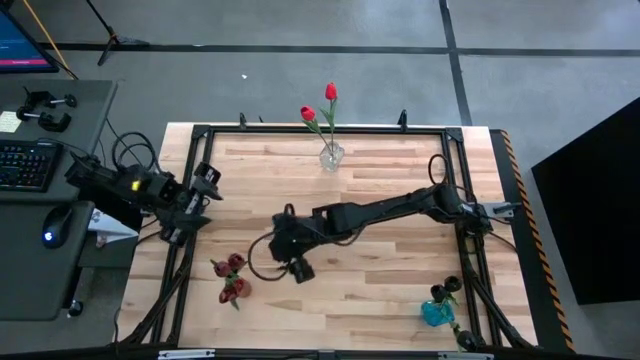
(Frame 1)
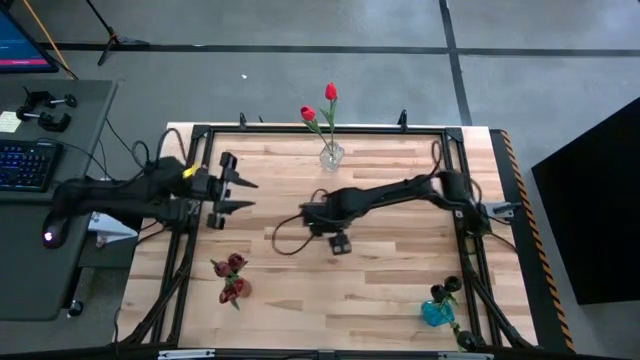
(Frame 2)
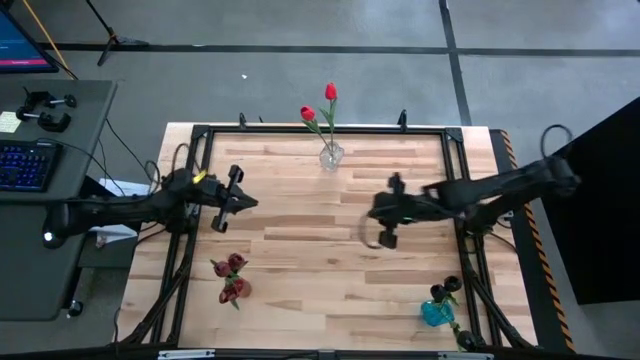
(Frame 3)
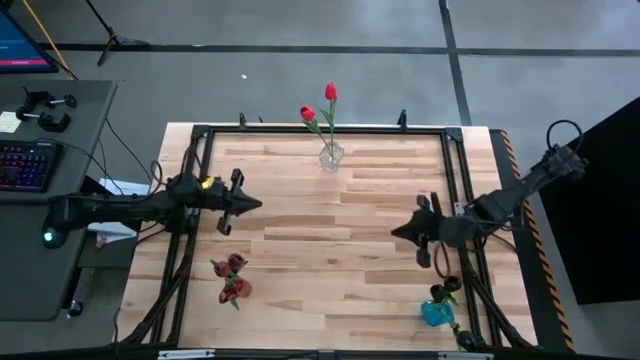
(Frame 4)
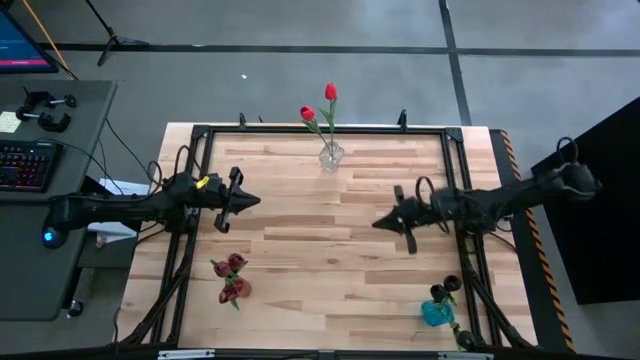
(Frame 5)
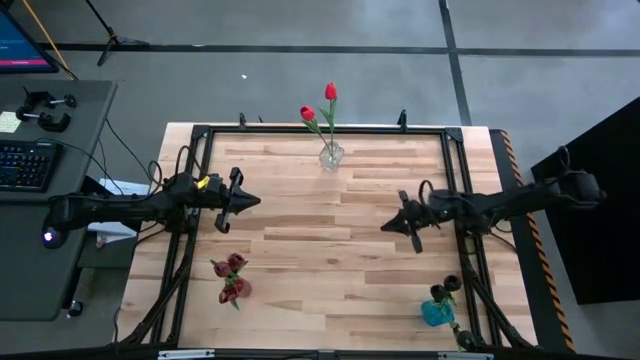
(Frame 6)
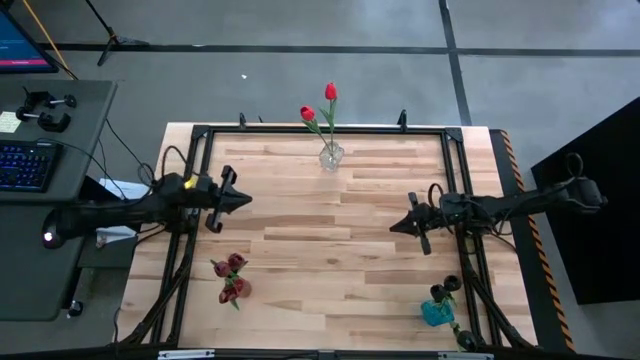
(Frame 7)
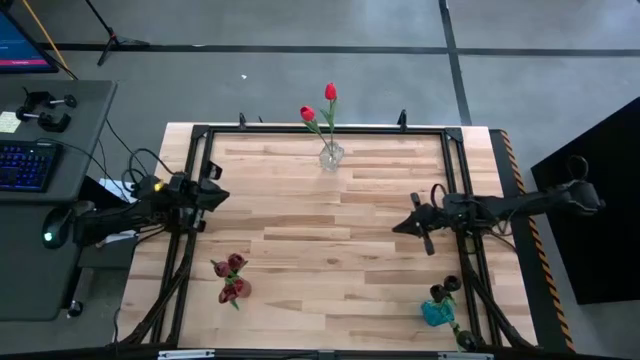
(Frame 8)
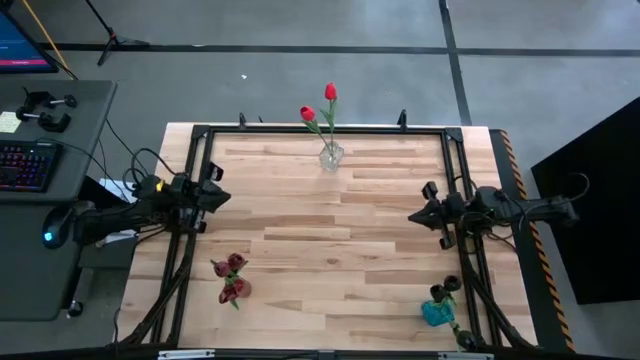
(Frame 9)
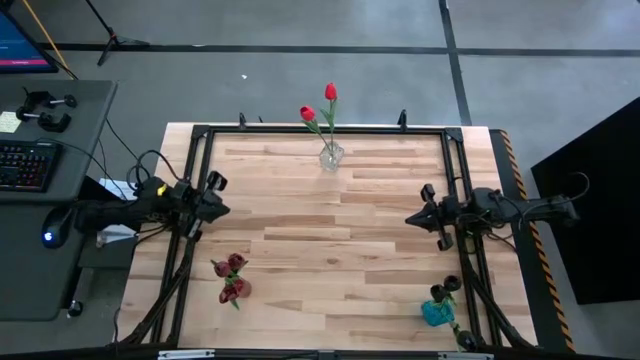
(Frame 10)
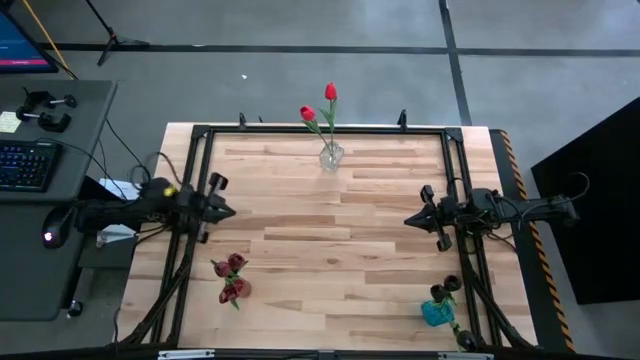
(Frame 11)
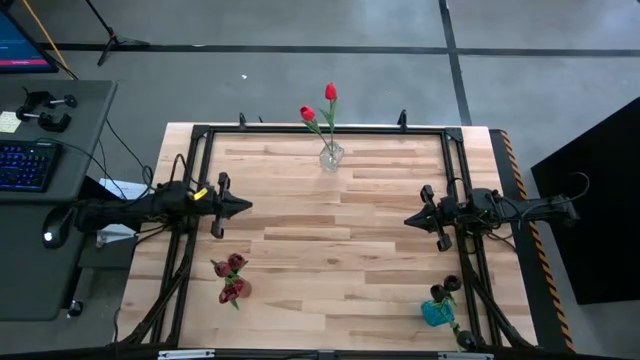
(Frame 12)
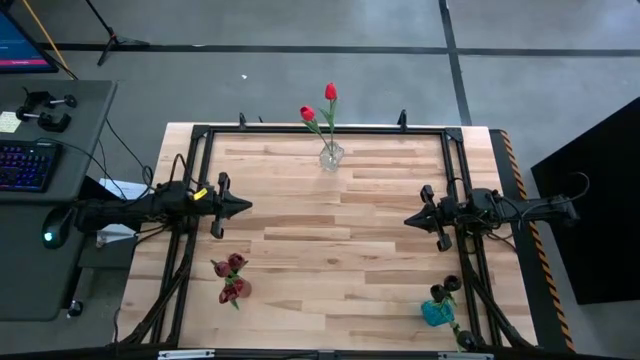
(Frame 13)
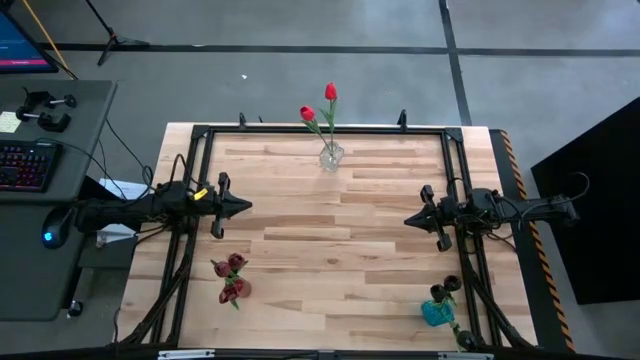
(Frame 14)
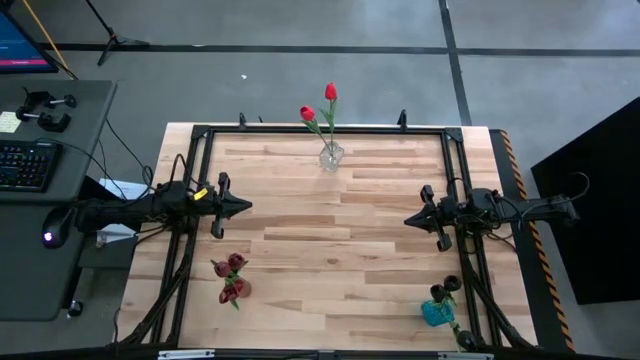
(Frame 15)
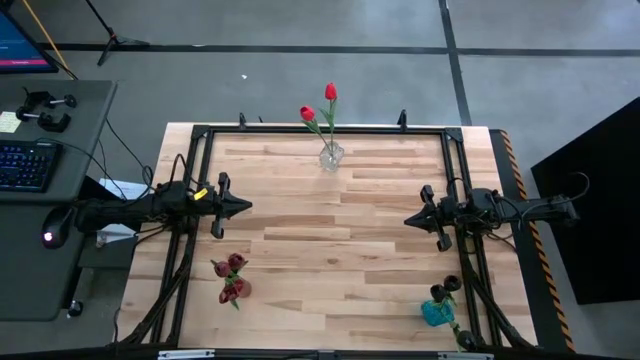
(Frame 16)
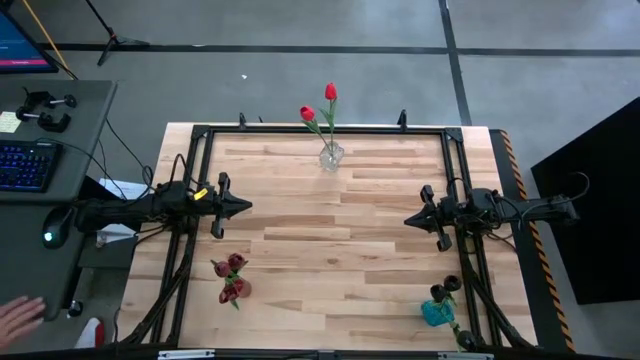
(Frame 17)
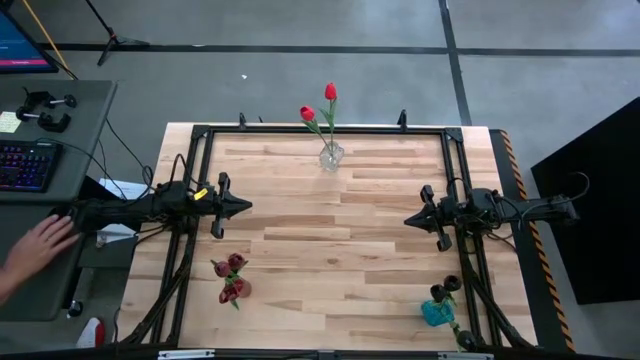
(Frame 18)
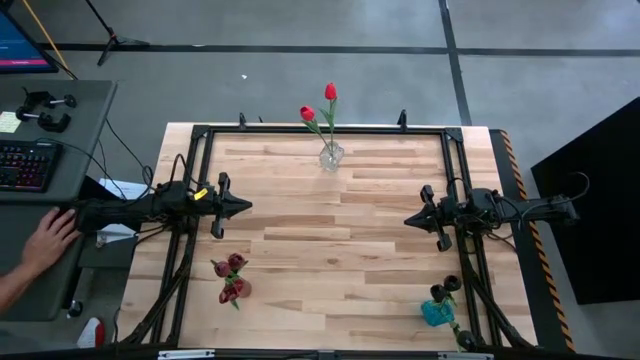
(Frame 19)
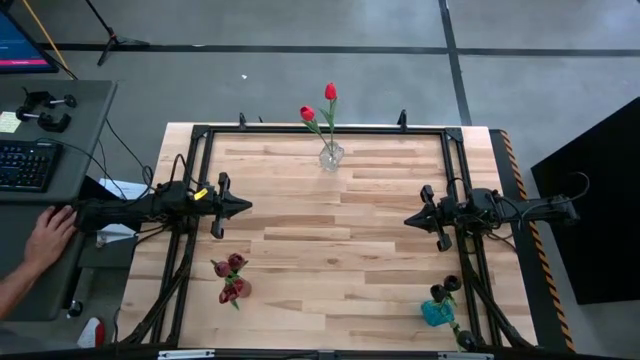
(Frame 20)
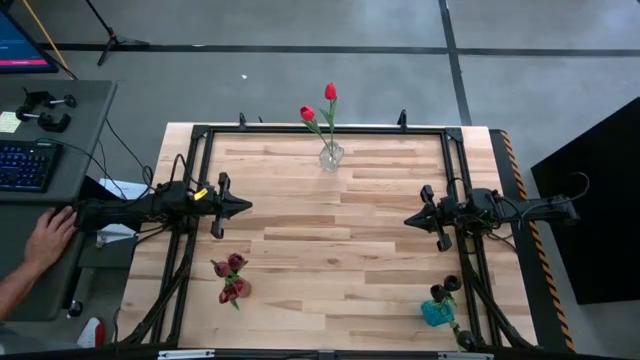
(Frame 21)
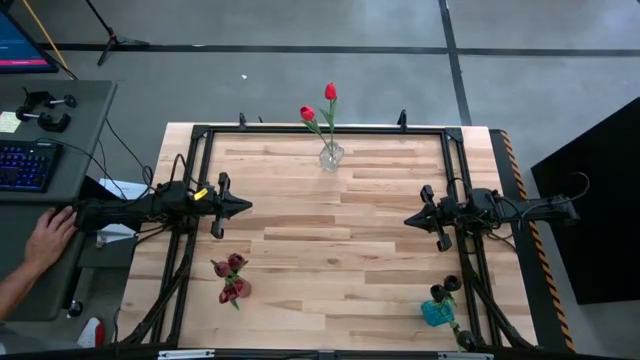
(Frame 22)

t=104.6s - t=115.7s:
Task: Sort flowers into vase by color
Return to Home Position

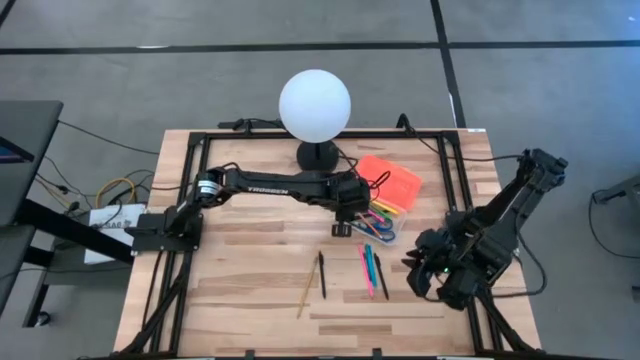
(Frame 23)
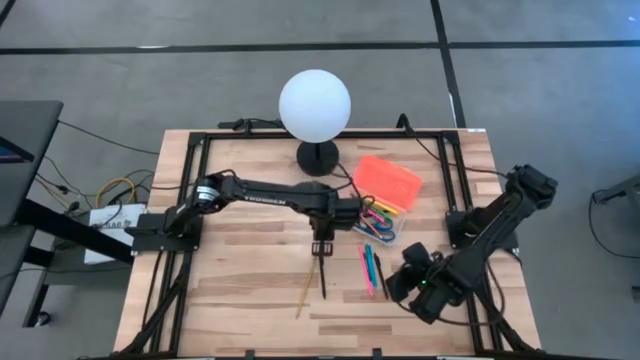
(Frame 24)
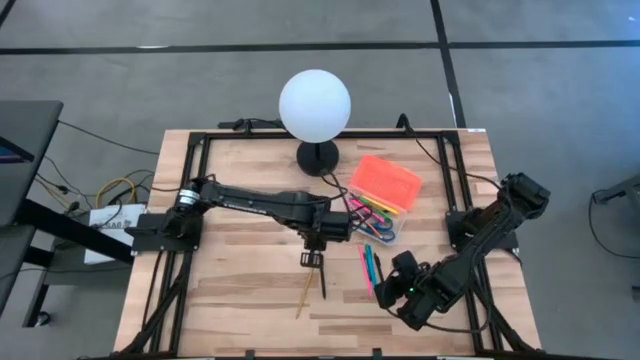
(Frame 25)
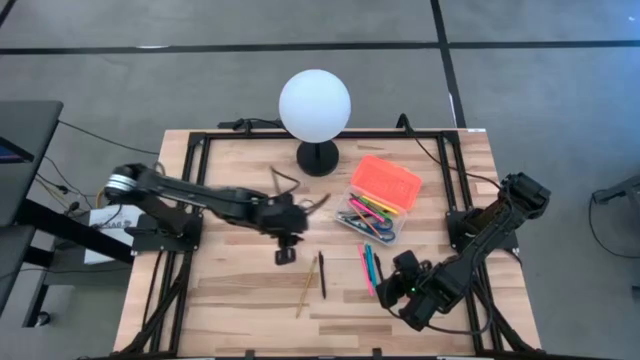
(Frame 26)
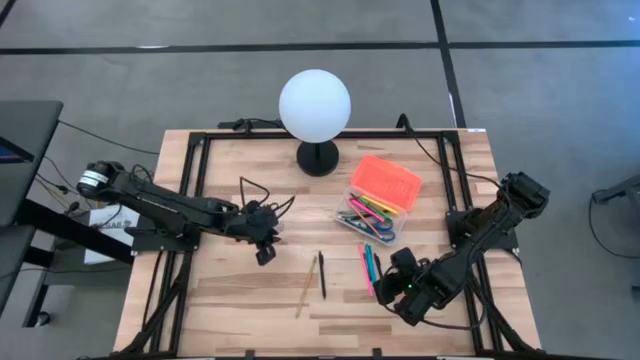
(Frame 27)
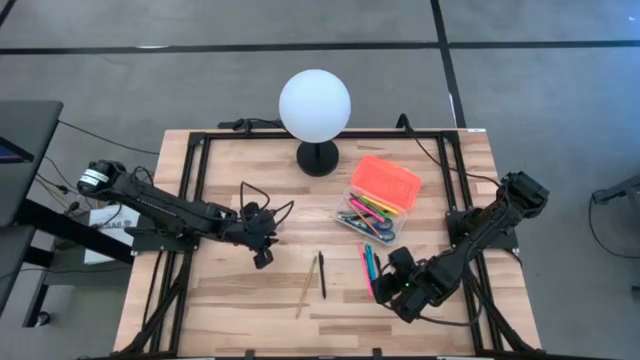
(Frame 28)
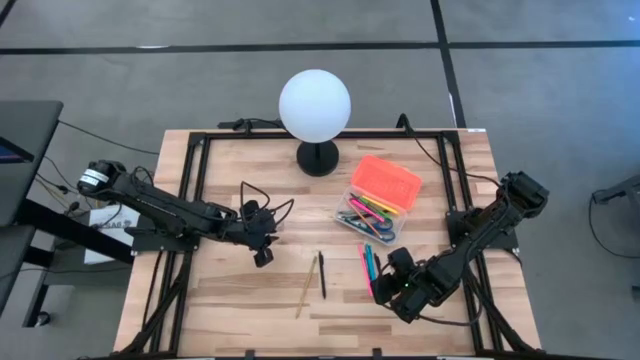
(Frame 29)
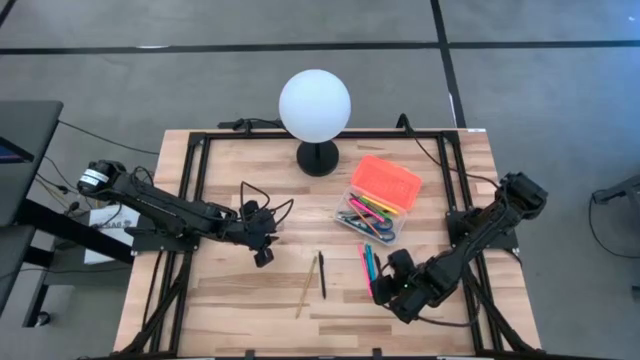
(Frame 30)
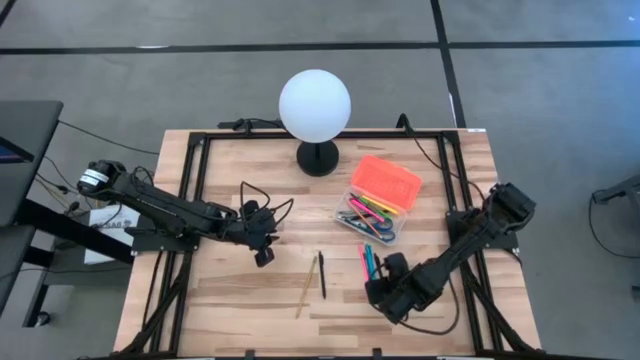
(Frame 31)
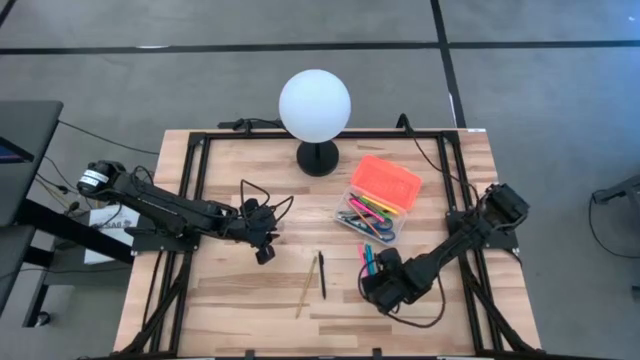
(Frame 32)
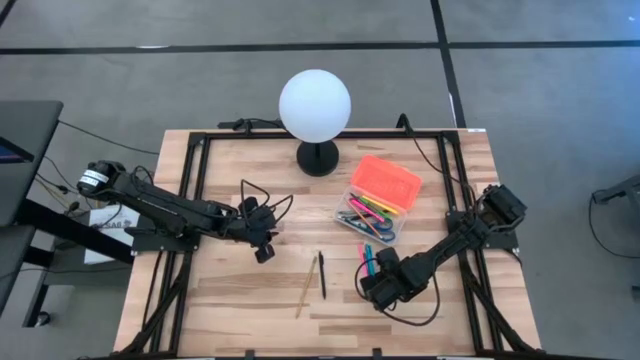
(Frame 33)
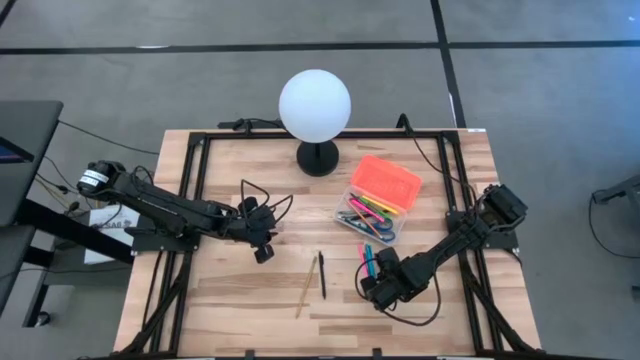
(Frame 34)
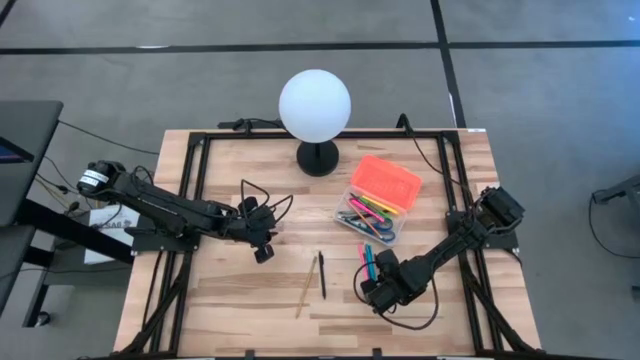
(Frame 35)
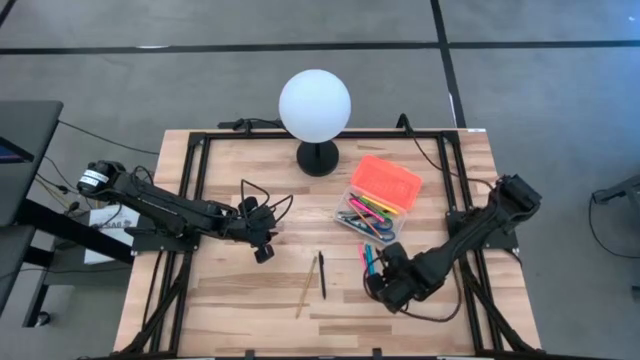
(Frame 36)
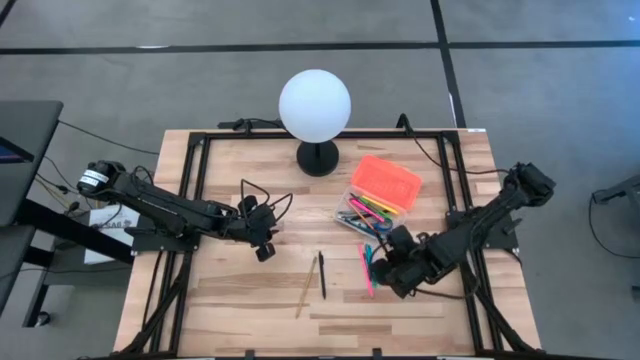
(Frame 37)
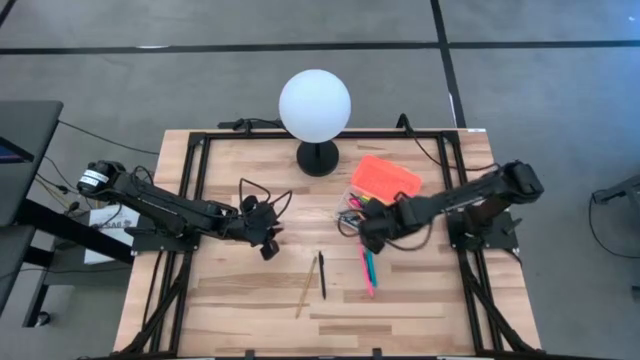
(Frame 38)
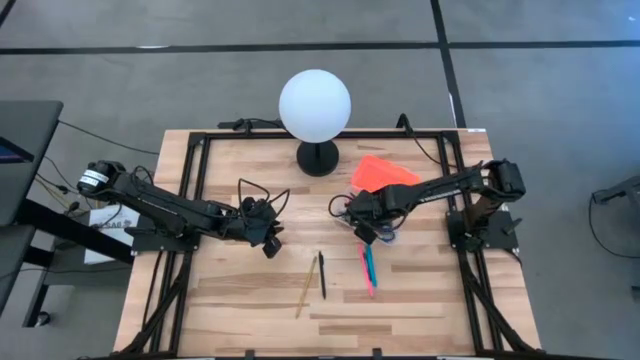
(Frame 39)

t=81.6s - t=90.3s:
Task: Pick & place school supplies into a supply box
Put the black pen into the orange supply box
